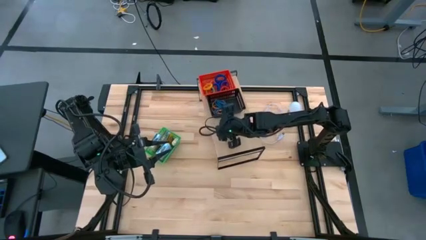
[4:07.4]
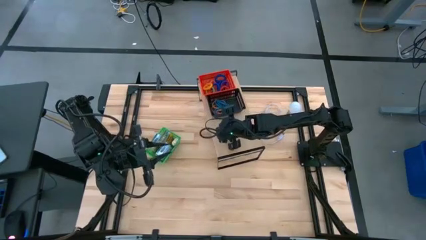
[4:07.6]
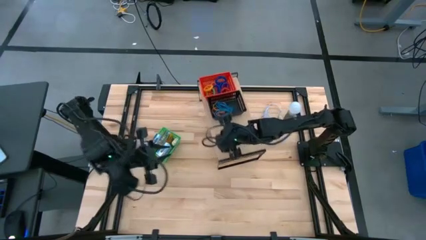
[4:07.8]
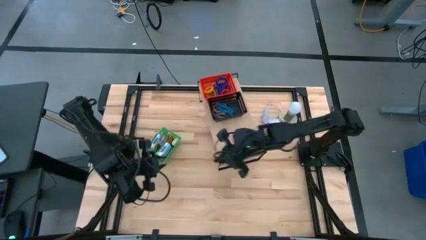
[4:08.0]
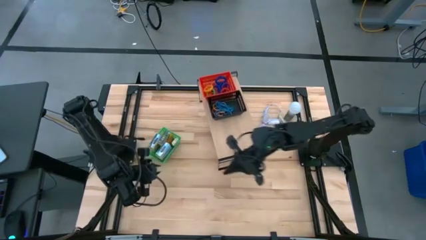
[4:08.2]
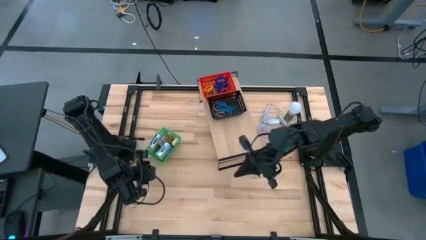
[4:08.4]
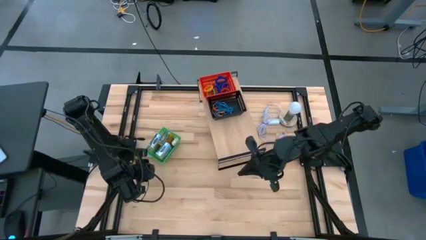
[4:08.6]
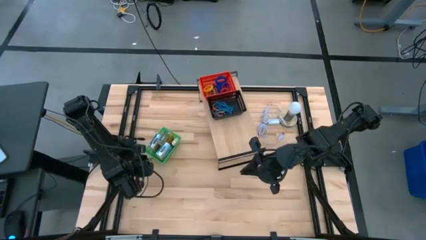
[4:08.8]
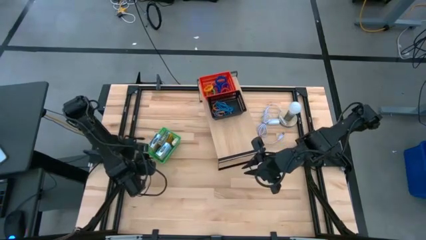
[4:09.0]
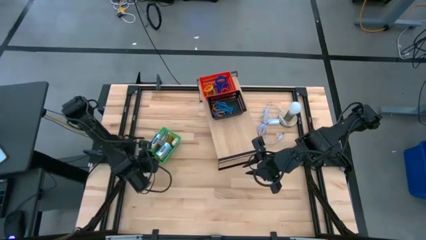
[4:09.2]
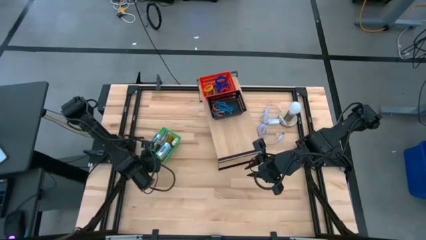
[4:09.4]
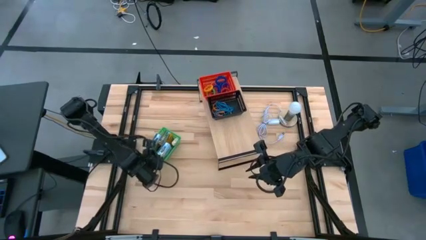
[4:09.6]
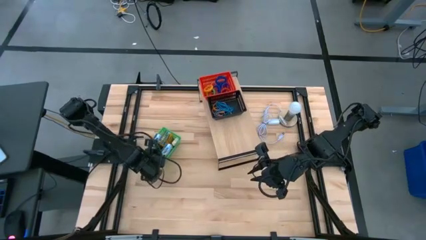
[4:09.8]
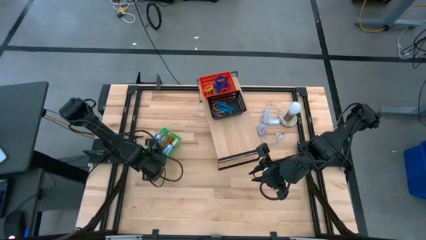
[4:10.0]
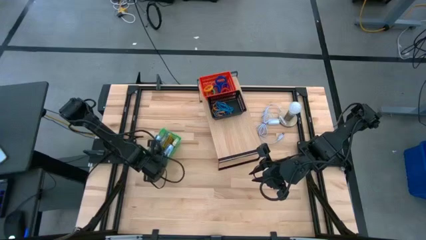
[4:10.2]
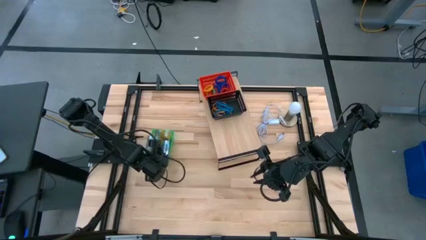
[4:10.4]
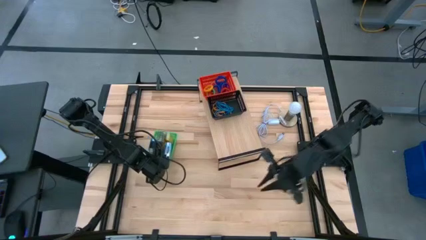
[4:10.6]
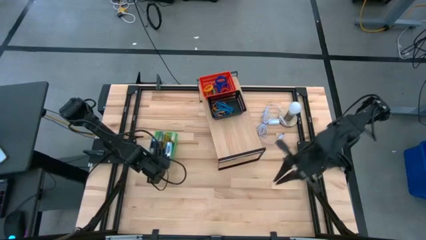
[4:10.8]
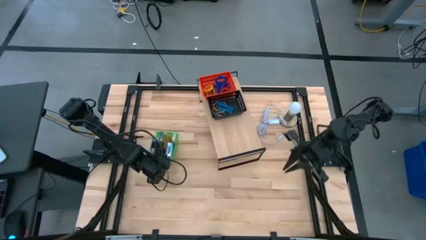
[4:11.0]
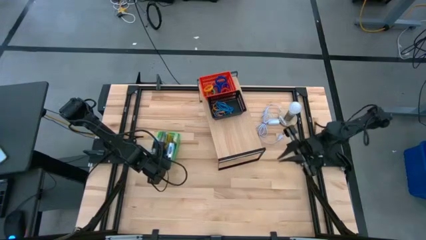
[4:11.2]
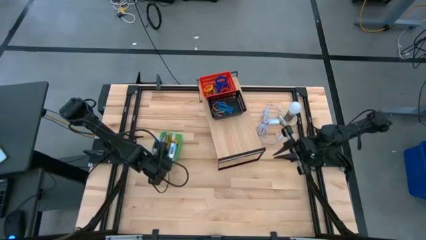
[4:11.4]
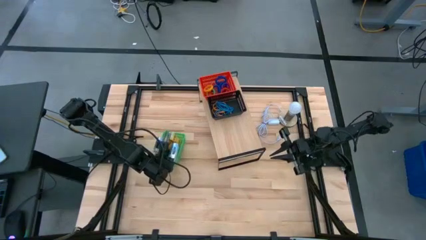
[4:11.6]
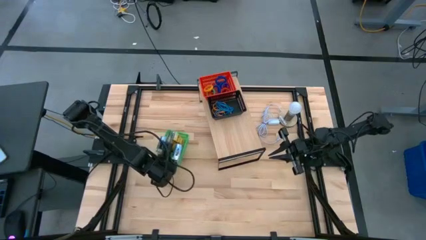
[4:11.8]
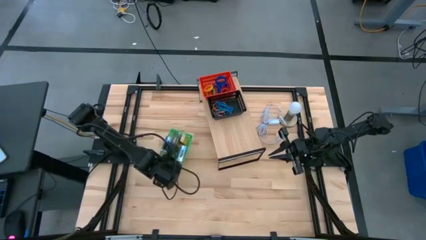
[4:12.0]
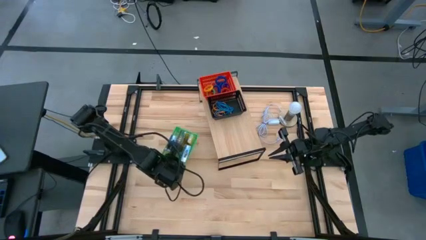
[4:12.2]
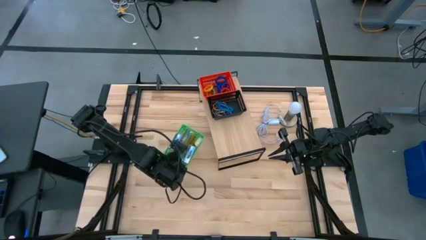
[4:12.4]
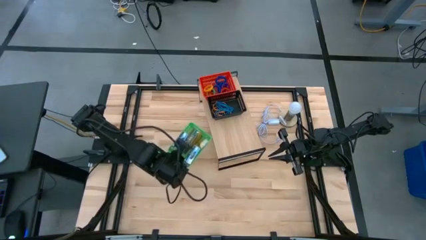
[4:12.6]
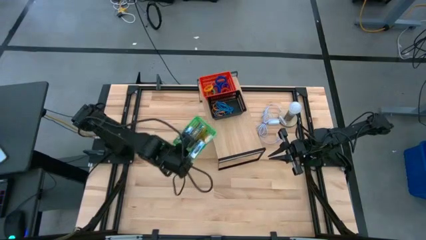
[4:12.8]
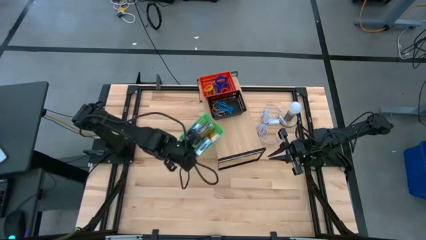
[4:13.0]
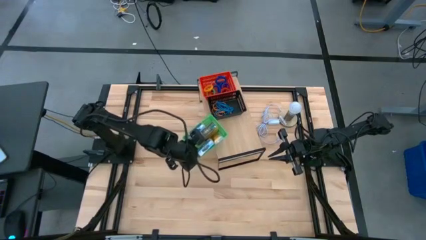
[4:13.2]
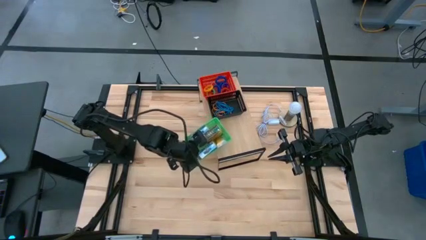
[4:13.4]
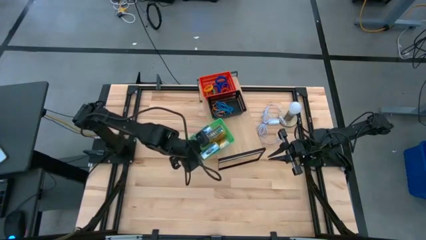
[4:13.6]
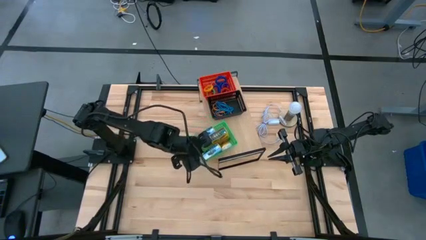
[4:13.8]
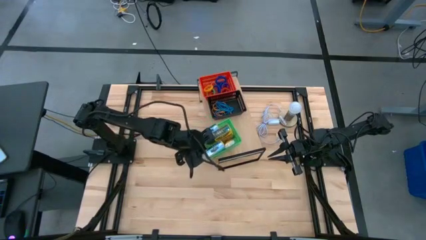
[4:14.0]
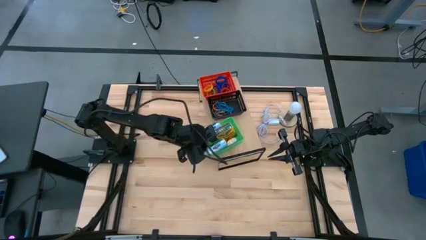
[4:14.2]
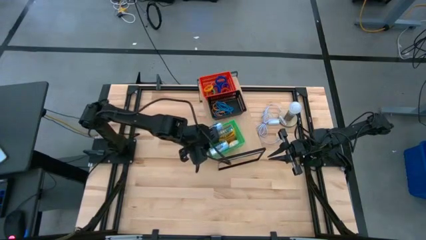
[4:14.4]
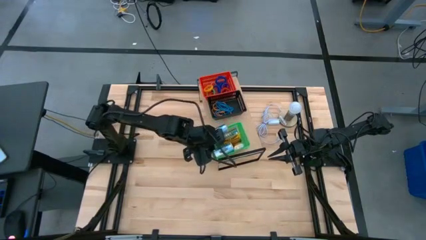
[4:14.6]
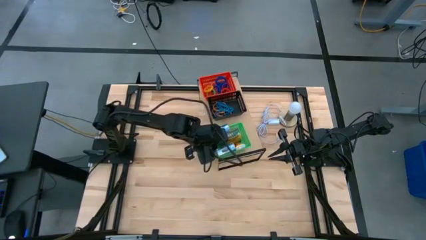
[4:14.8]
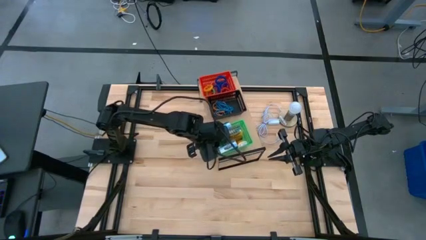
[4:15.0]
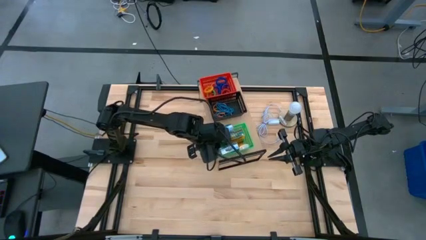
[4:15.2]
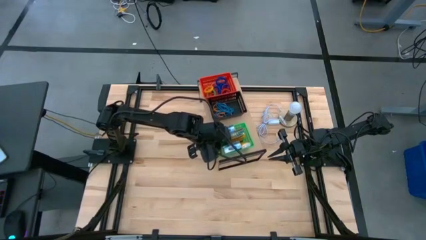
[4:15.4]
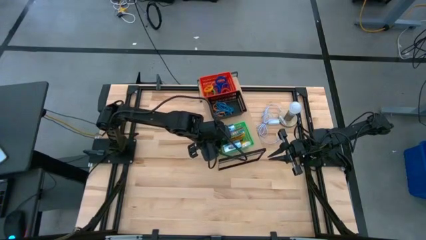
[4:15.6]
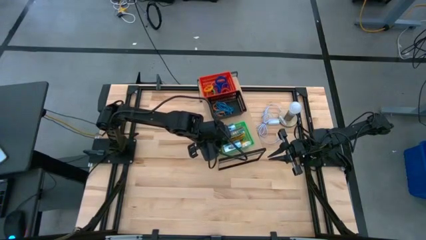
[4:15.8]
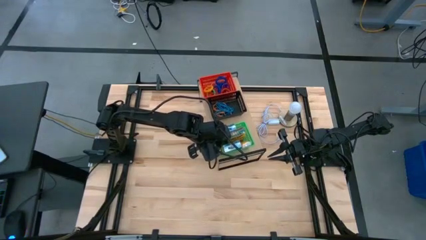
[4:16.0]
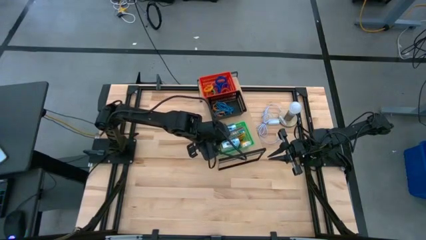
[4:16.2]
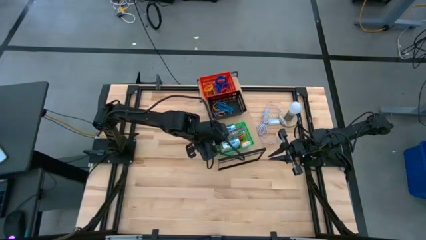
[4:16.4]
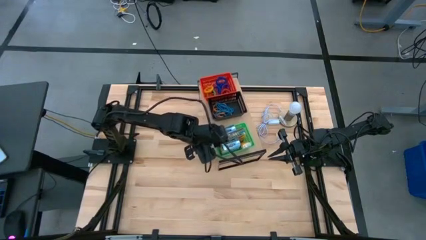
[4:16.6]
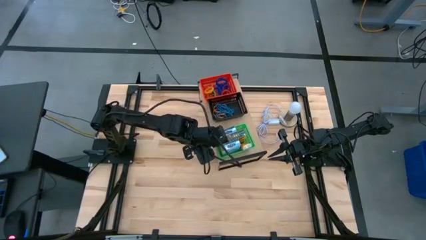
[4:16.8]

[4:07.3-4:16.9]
Task: Pick & Place Office Desk Supplies
Put the green basket with crayon boxes on the shelf

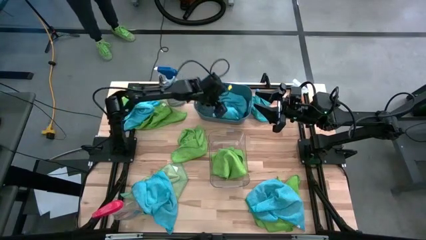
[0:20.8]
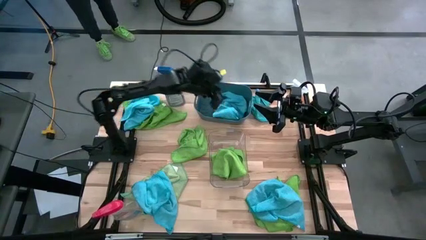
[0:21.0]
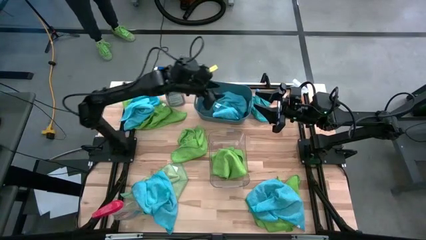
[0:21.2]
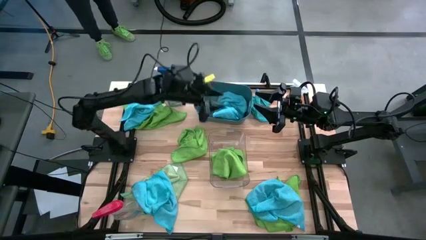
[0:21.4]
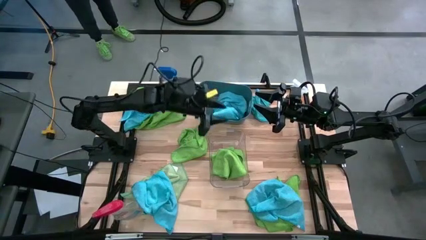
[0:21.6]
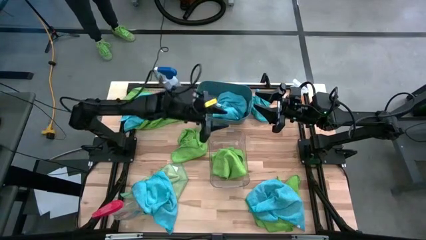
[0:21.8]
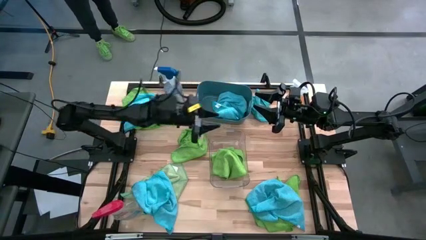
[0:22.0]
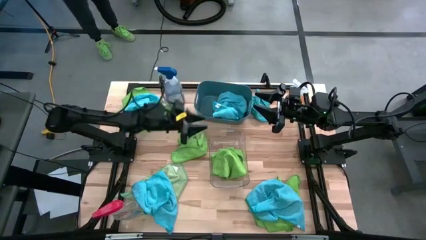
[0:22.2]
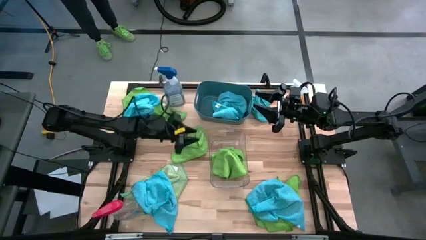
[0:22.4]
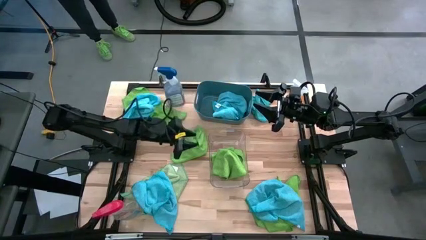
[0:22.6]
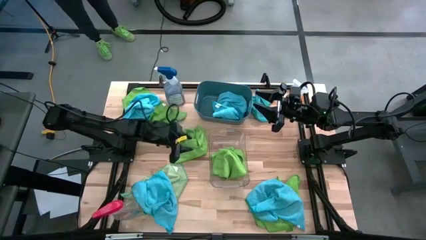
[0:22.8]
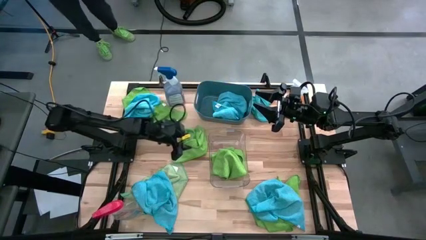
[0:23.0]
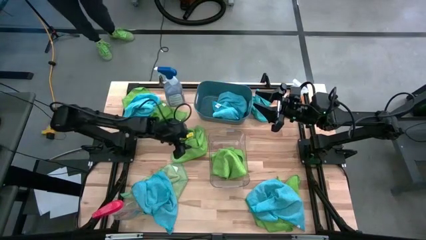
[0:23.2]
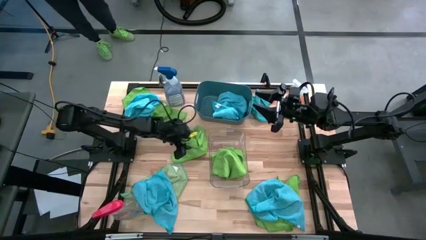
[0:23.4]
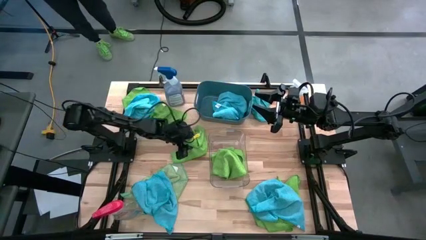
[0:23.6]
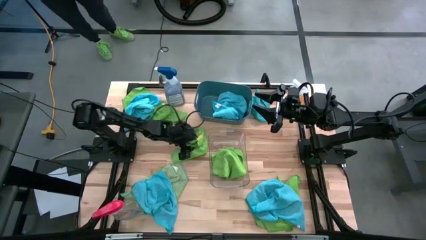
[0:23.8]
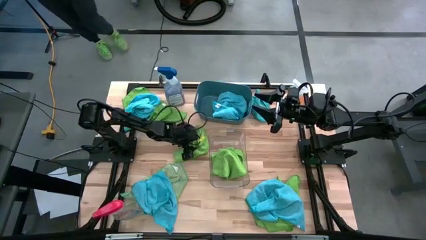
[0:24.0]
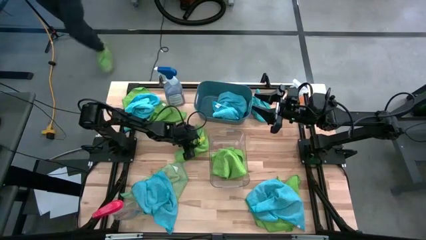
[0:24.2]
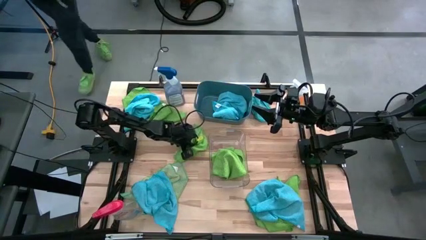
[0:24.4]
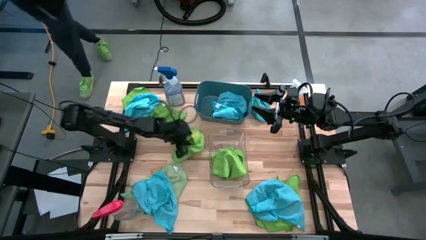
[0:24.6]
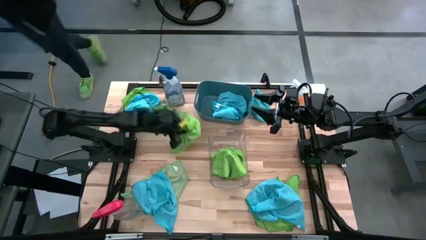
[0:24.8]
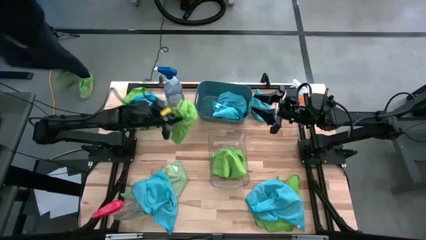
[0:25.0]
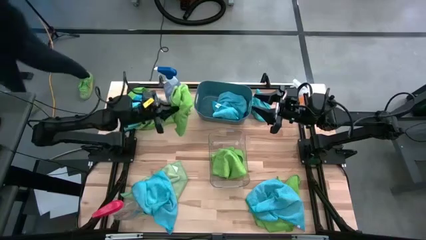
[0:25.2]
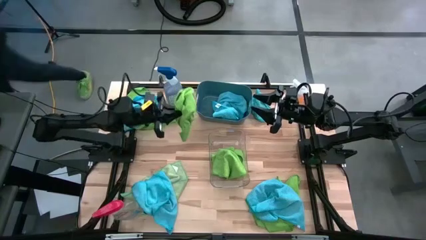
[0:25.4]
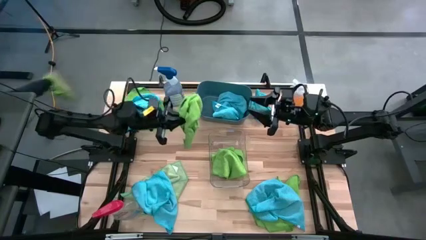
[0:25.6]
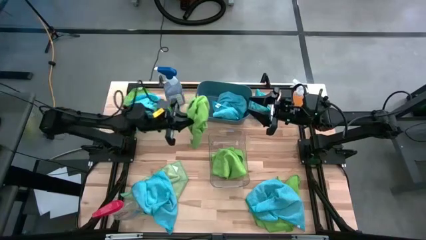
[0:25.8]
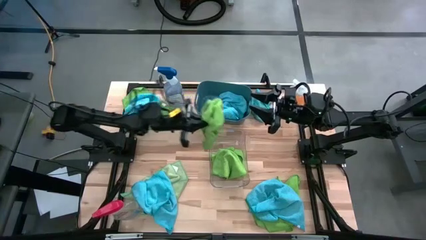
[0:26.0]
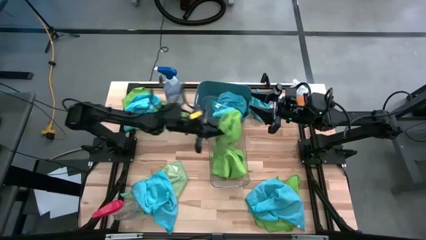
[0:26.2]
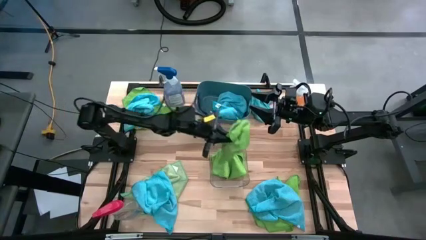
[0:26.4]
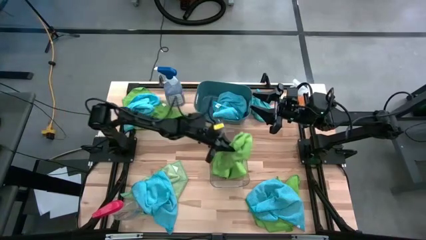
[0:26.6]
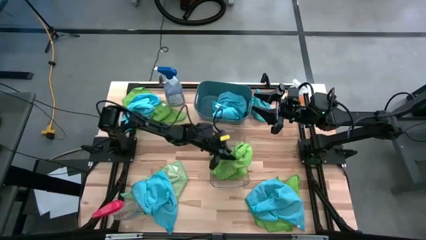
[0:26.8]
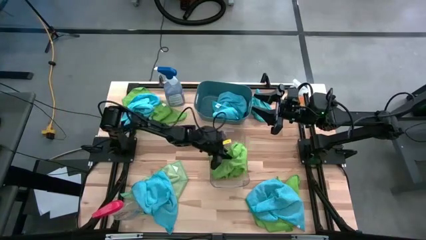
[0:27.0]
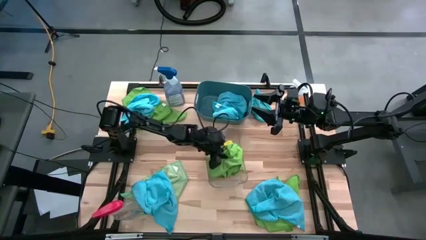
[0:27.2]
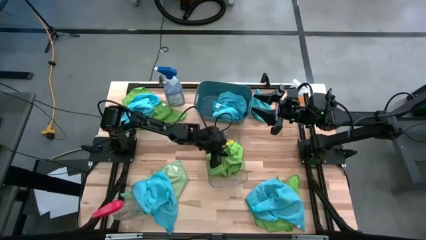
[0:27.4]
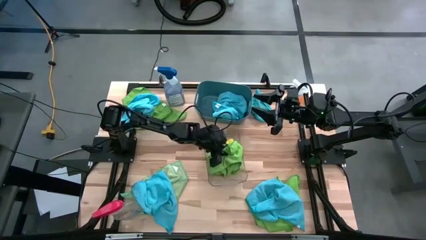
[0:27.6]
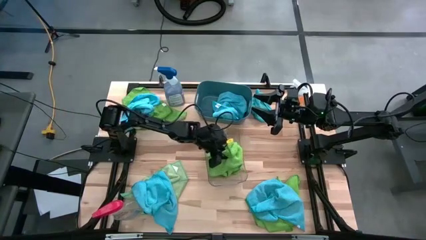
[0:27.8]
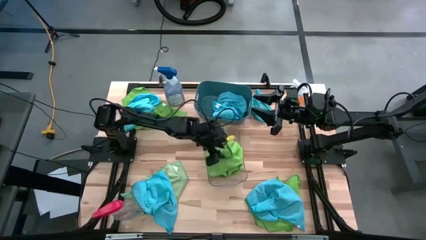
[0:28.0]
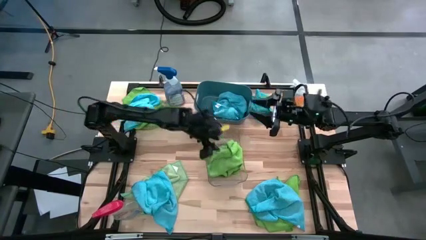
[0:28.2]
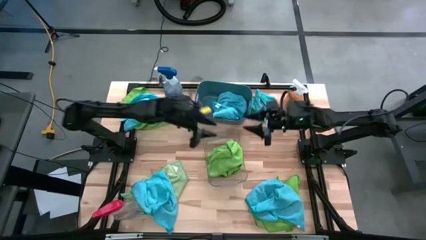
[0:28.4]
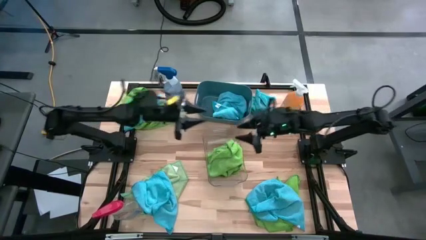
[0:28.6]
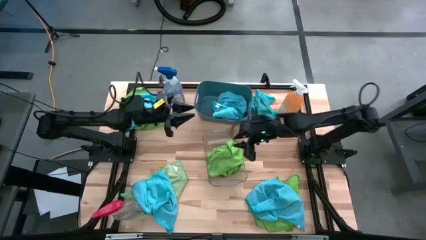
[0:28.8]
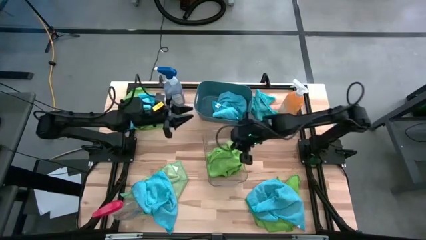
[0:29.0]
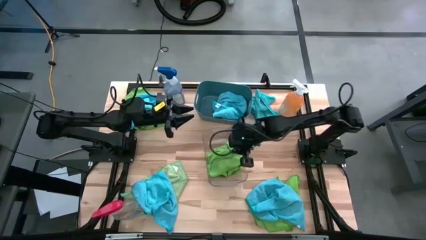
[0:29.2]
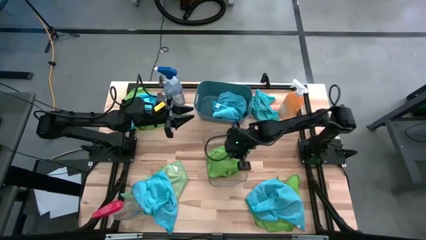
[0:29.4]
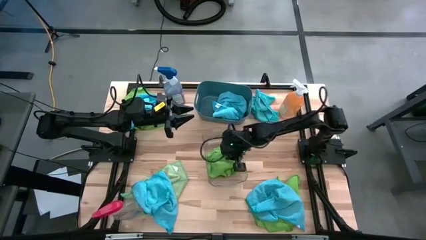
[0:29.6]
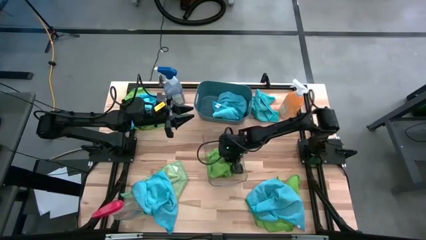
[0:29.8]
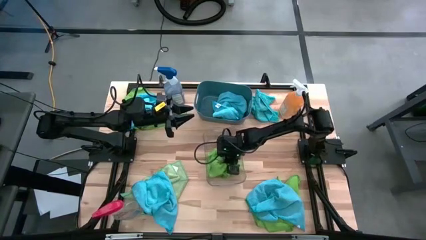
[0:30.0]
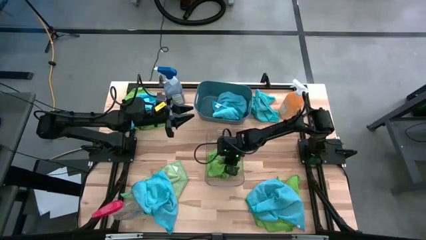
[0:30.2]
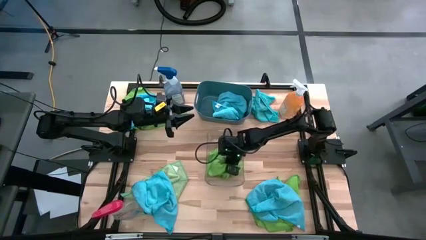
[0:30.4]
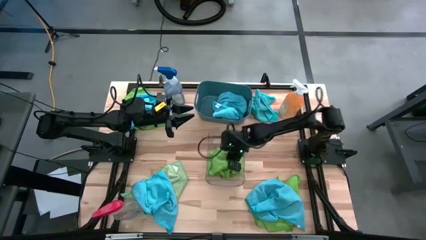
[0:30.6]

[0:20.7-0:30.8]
Task: Sort microfiber towel by color & place in baskets
Put the green microfiber towel into the transparent bin
